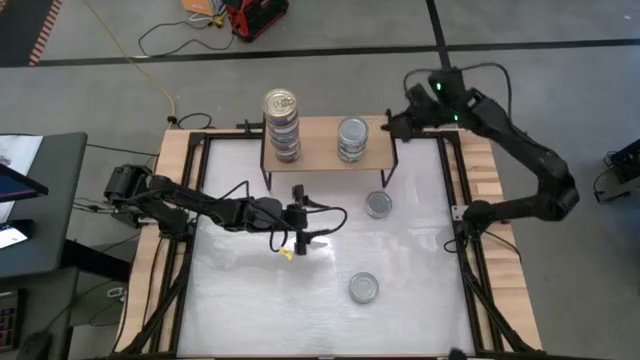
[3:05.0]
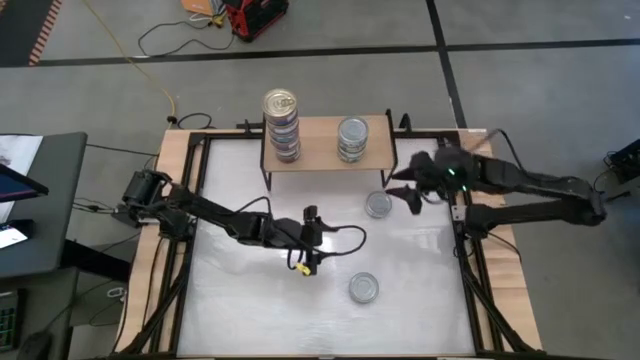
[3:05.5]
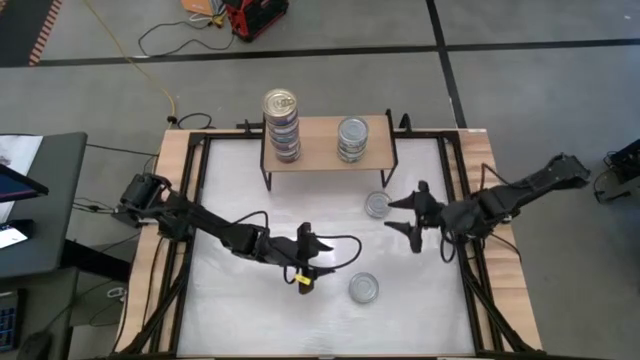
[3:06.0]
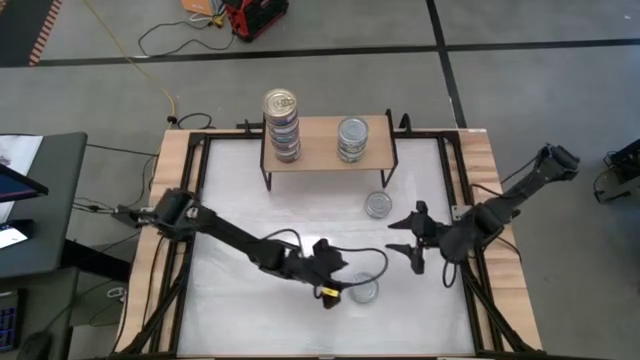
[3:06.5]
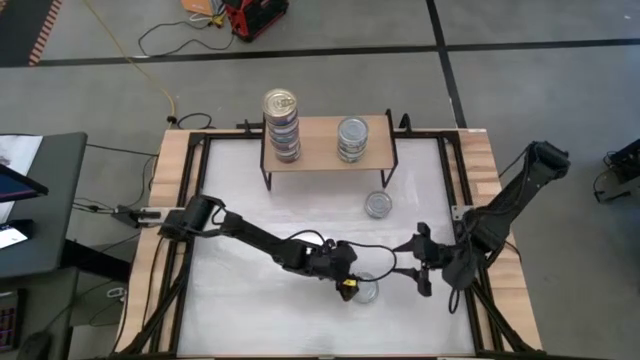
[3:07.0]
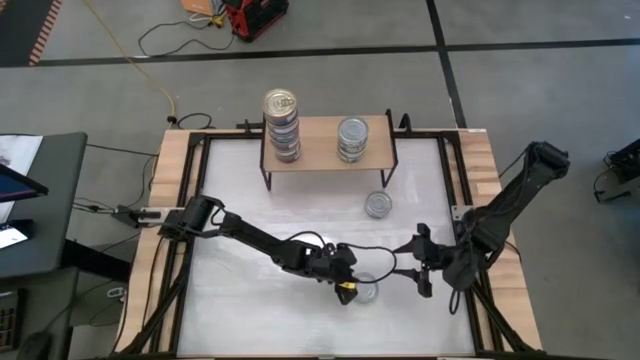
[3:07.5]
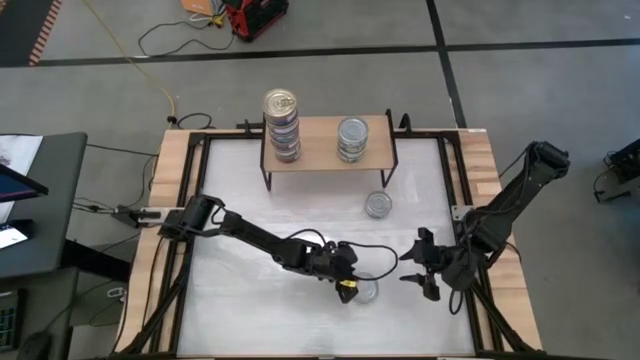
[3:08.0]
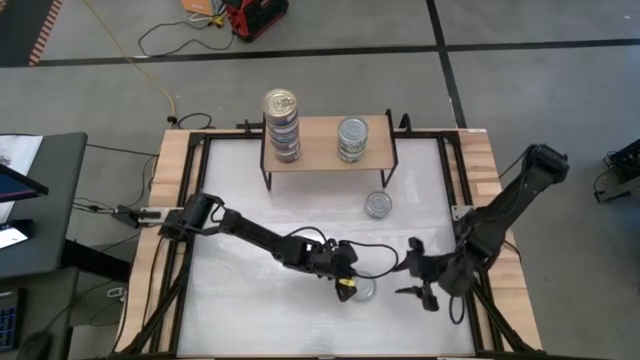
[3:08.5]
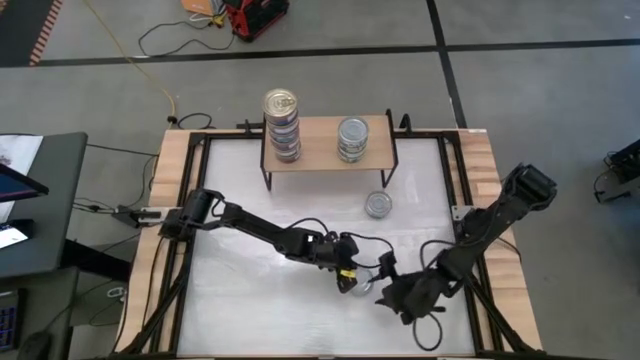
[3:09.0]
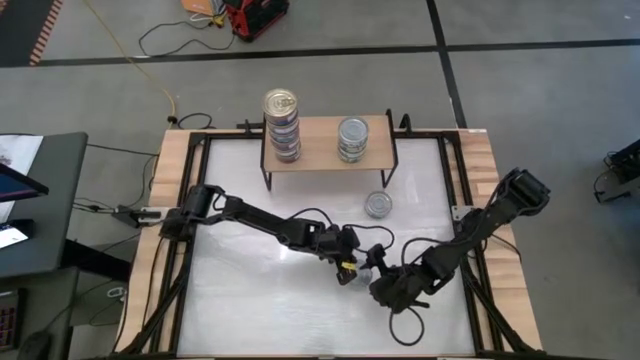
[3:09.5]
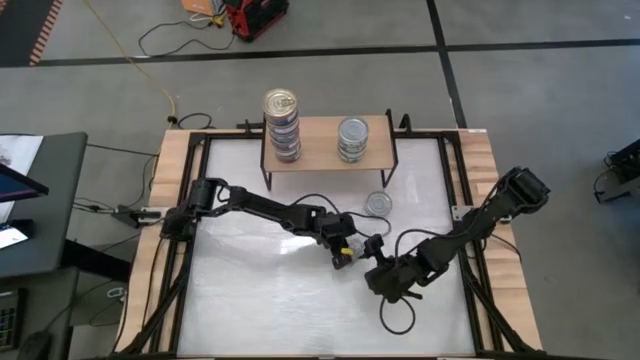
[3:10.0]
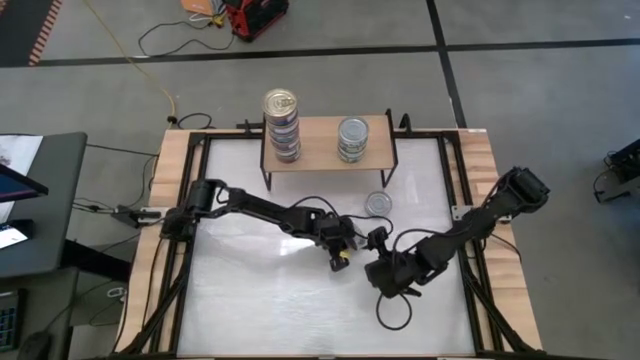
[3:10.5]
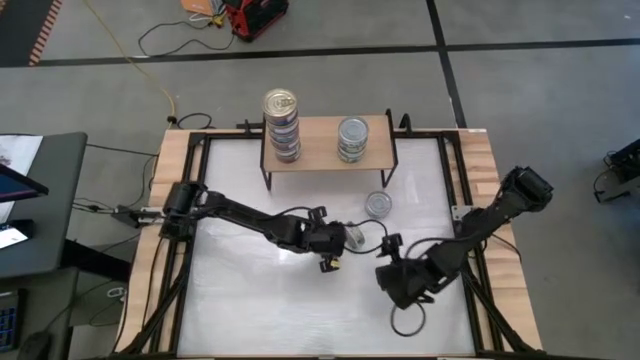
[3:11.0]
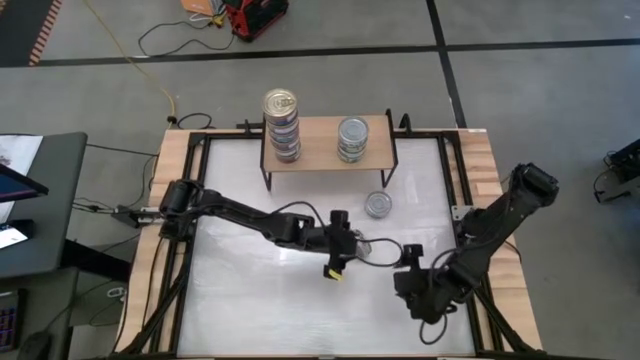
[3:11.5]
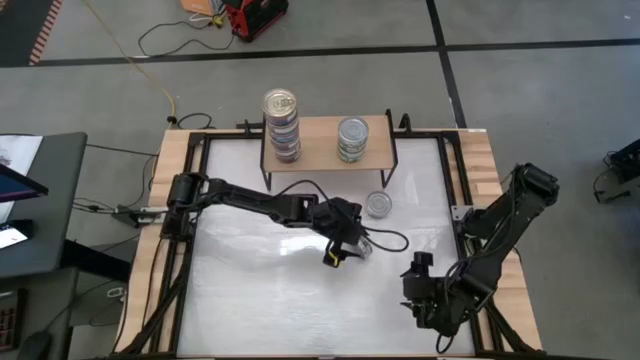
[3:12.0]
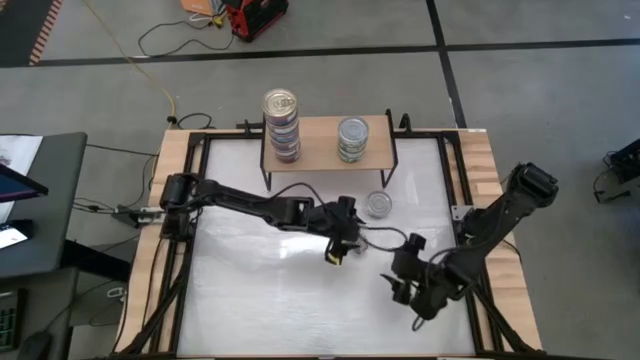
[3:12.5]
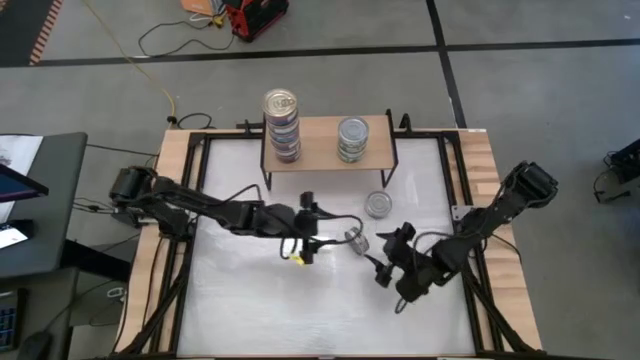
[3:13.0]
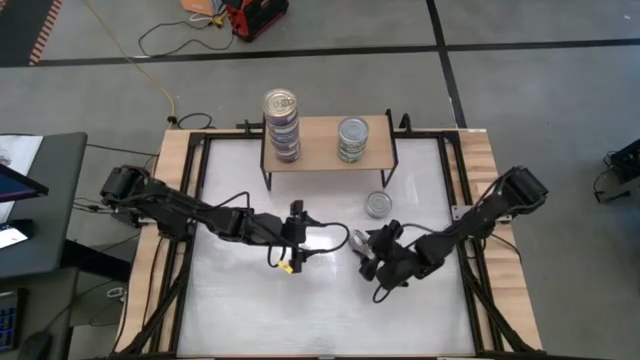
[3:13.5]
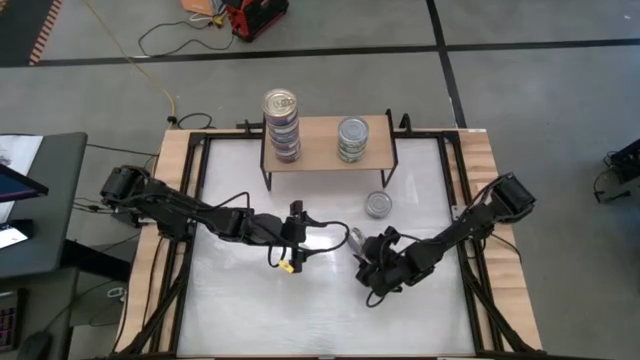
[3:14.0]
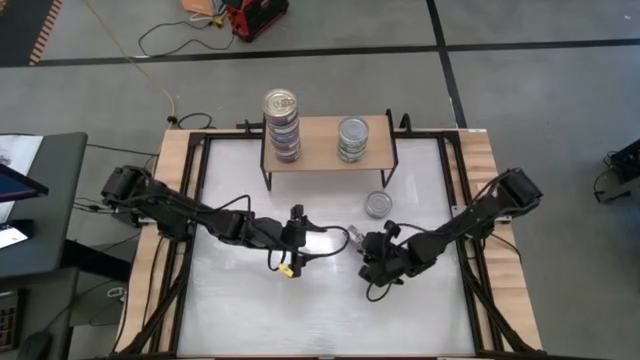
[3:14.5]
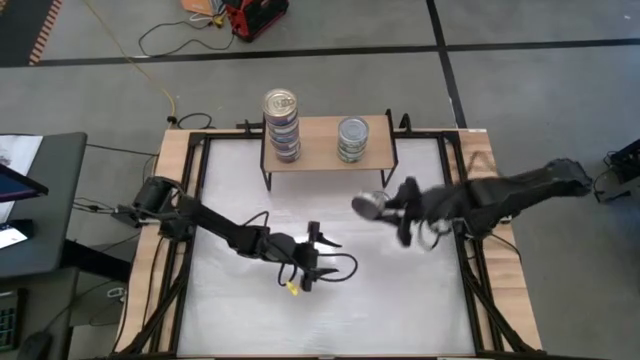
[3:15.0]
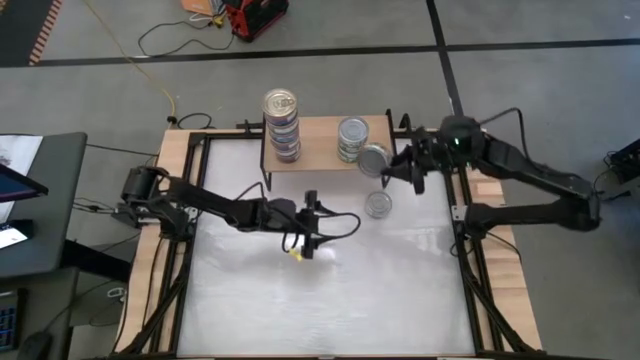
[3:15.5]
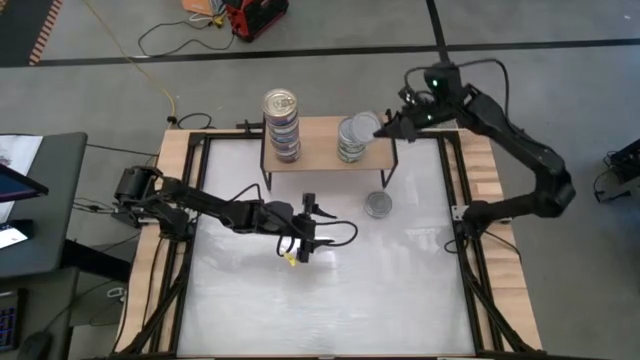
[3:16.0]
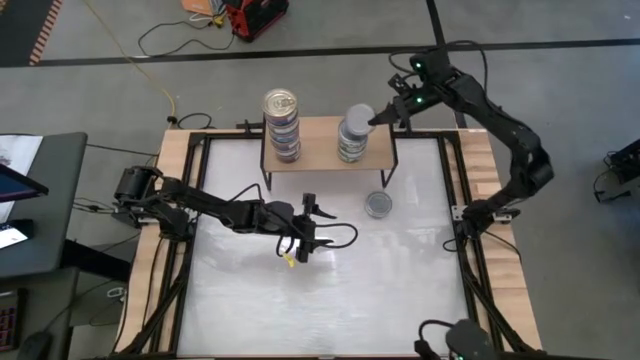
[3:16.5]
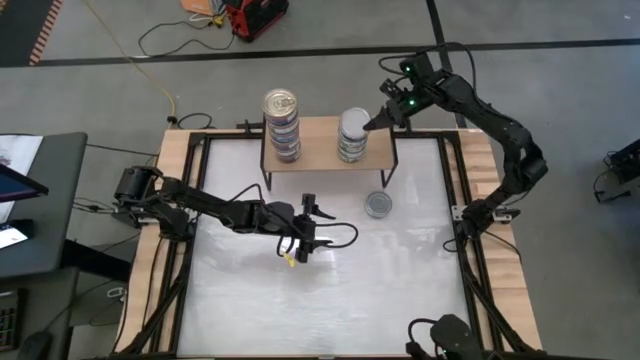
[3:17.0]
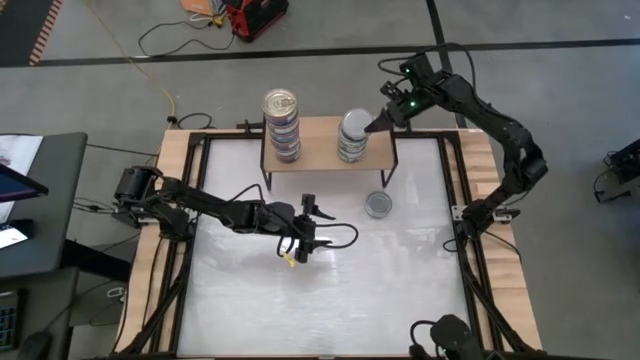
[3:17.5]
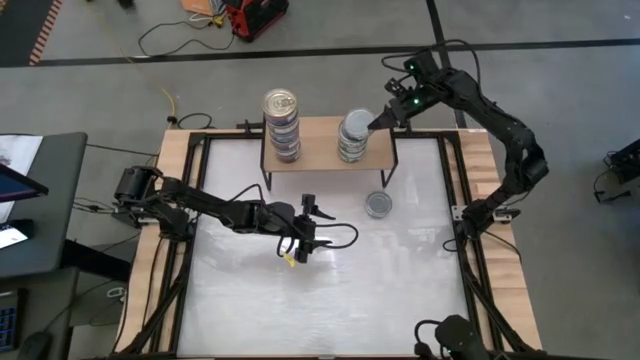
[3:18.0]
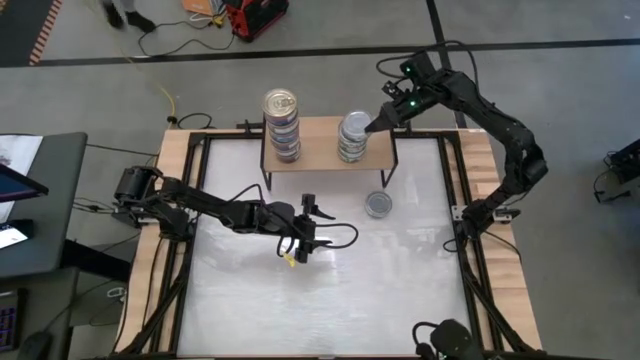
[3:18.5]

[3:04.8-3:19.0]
Task: Stack canned seafood by type on shelf
Stack the green tuna can on top of the green tuna can

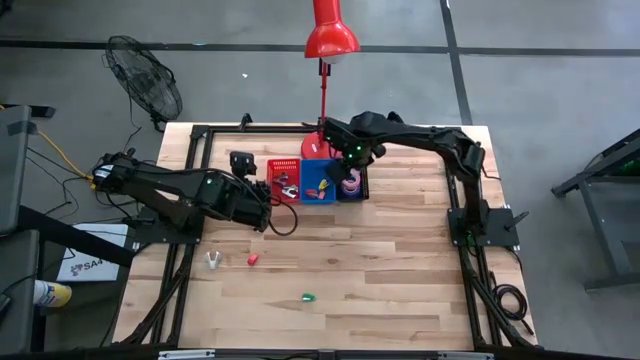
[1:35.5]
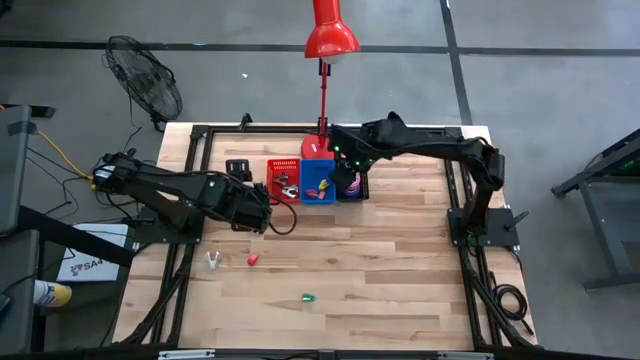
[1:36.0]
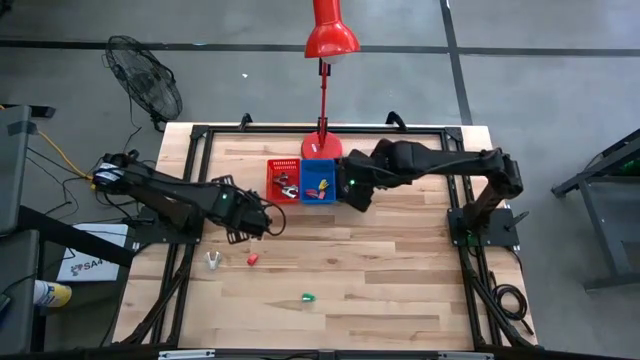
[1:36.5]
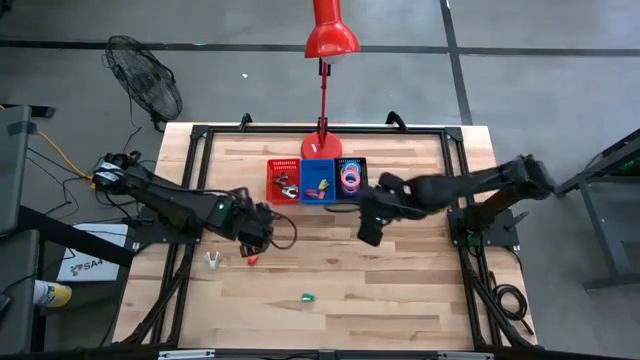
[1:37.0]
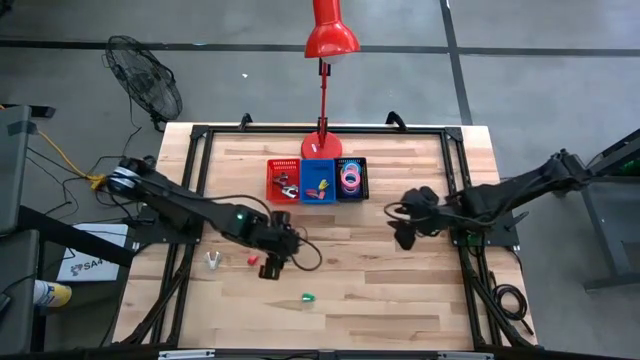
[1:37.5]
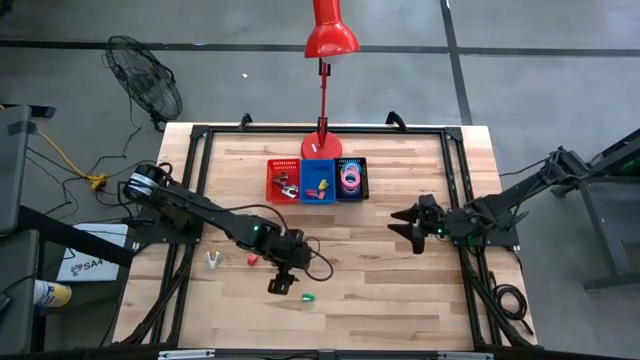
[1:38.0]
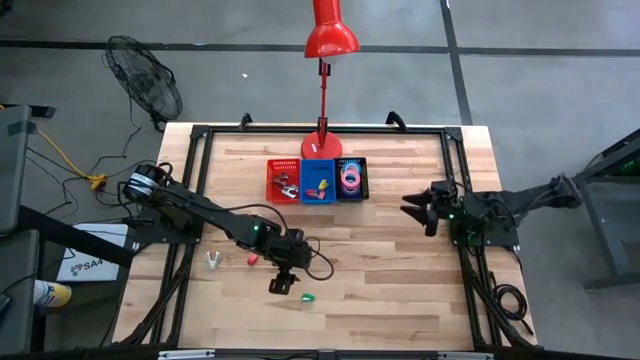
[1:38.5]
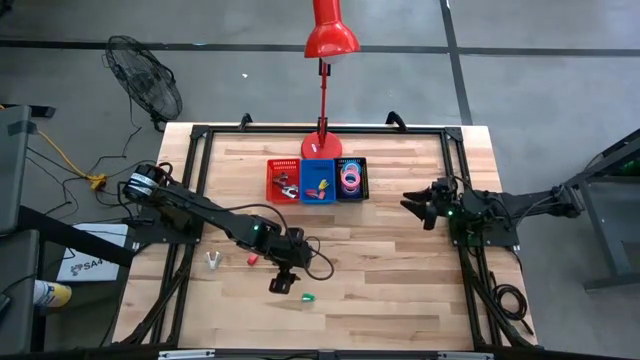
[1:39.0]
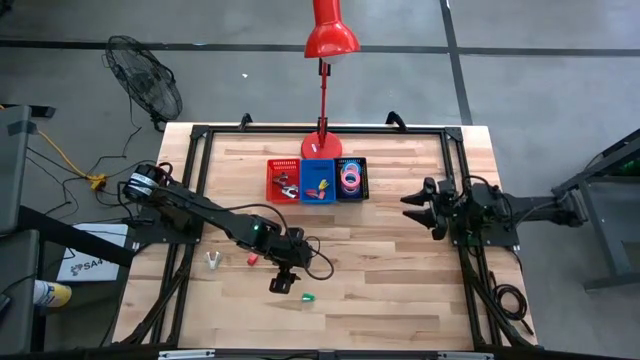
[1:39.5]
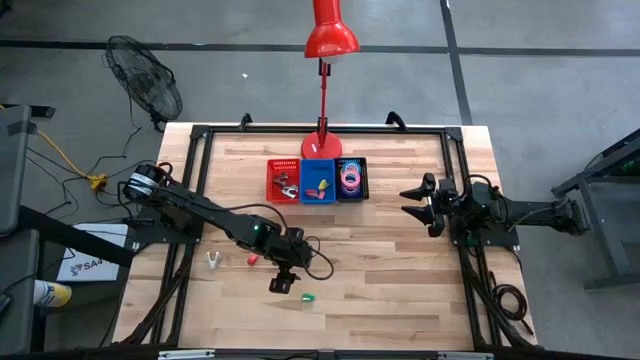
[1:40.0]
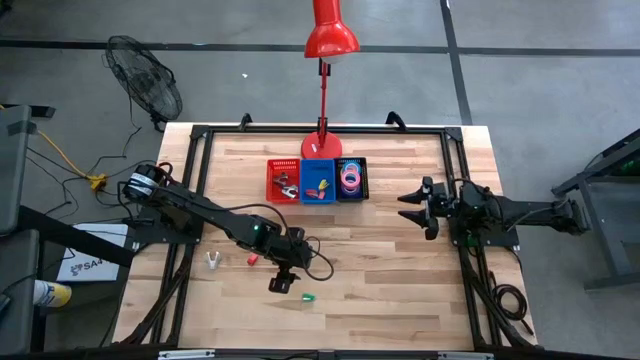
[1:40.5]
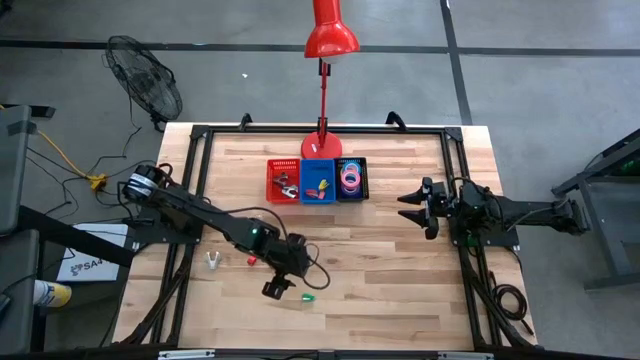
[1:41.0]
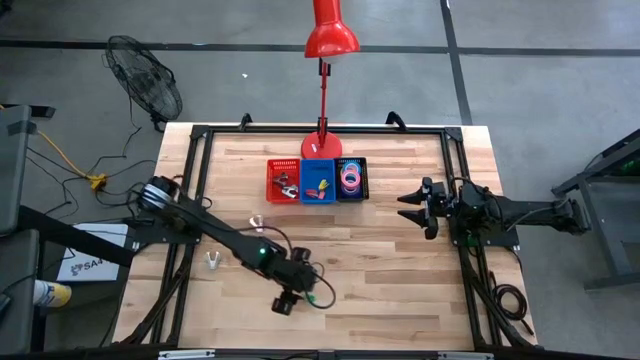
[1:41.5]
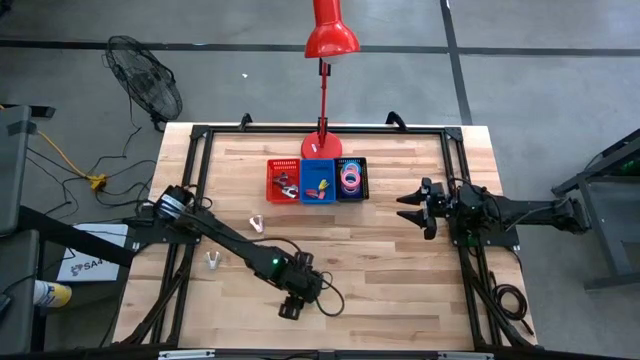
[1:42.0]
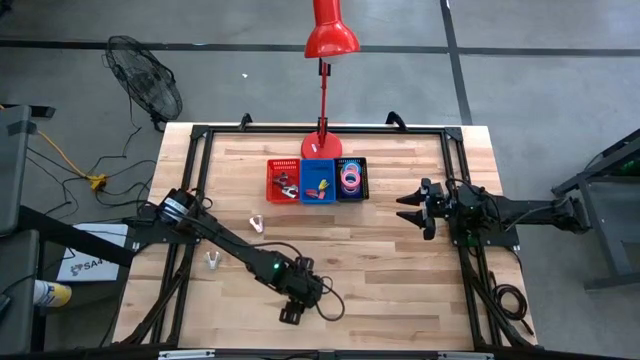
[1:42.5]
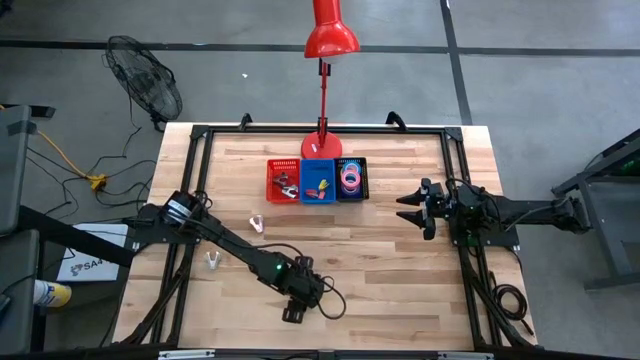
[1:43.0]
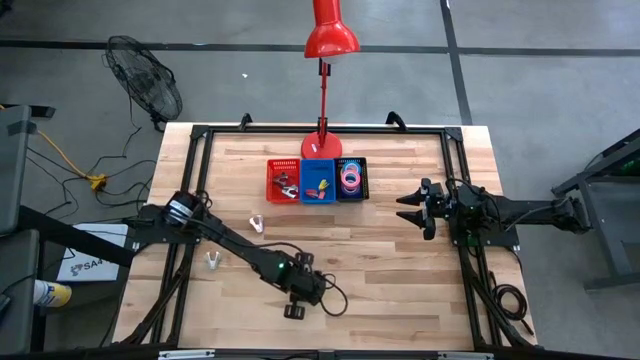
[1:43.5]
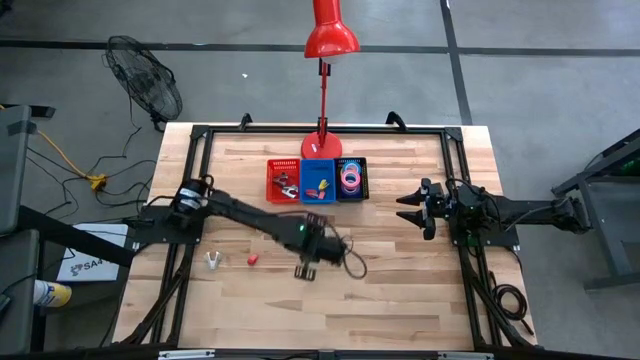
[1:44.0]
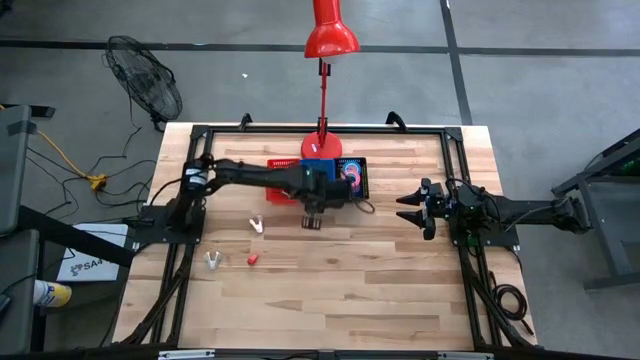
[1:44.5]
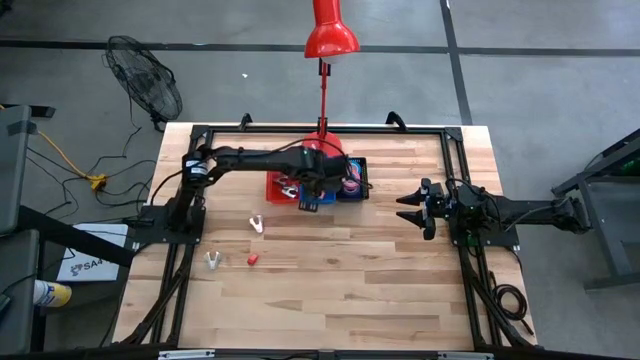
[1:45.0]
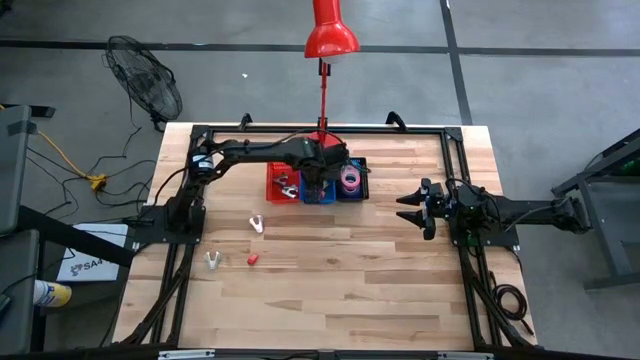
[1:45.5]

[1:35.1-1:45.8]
Task: Pick and place Stapler, Stapler remover, tape
Put the green stapler into the blue basket
